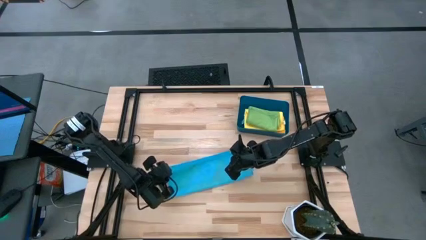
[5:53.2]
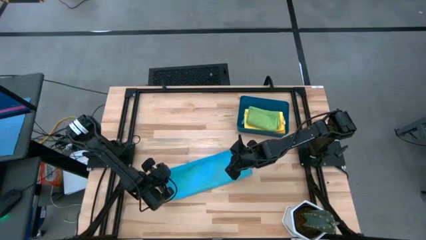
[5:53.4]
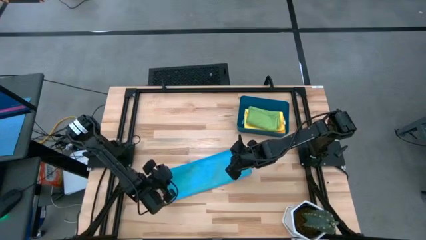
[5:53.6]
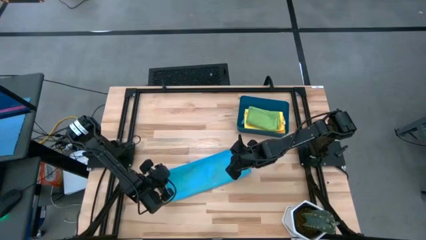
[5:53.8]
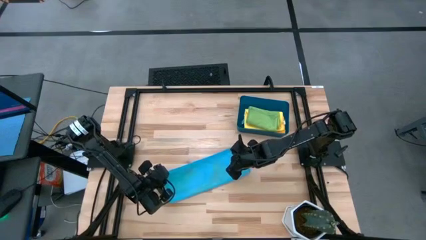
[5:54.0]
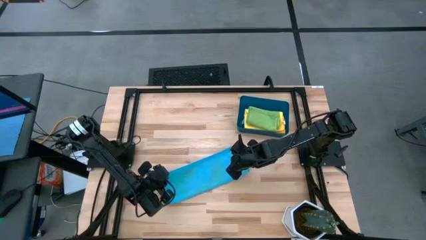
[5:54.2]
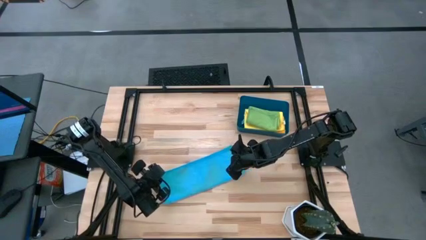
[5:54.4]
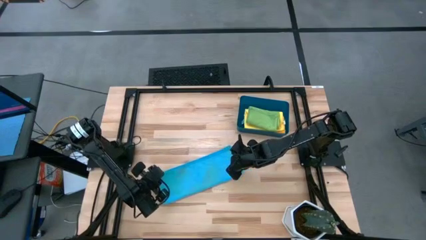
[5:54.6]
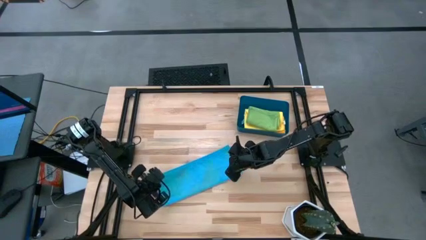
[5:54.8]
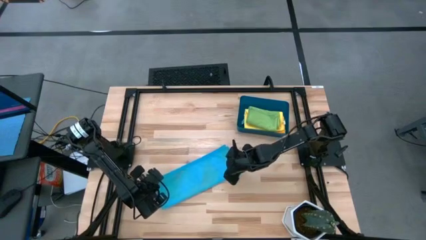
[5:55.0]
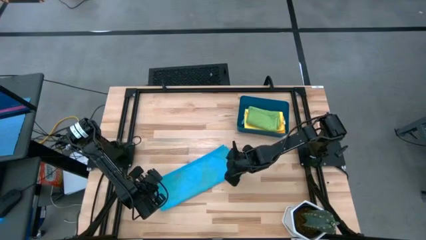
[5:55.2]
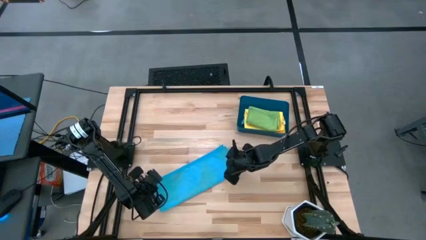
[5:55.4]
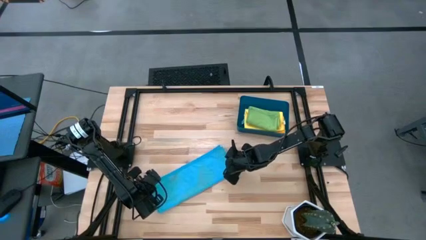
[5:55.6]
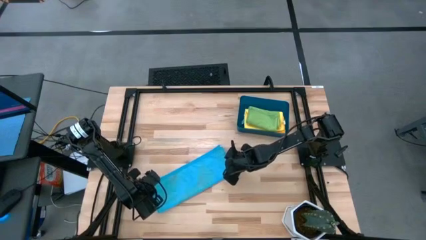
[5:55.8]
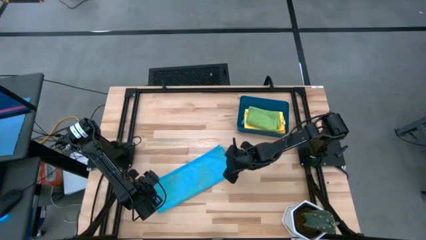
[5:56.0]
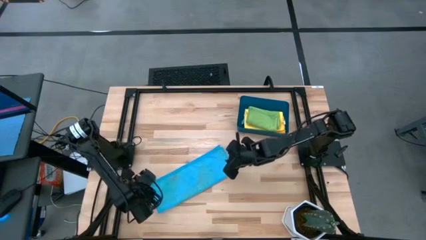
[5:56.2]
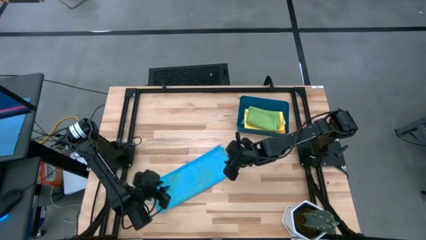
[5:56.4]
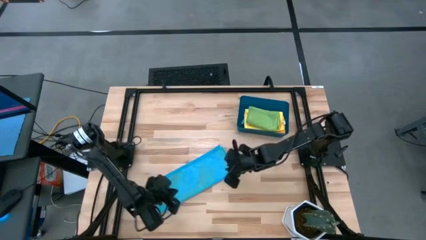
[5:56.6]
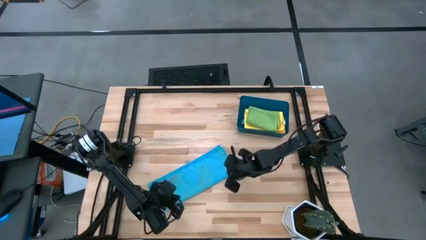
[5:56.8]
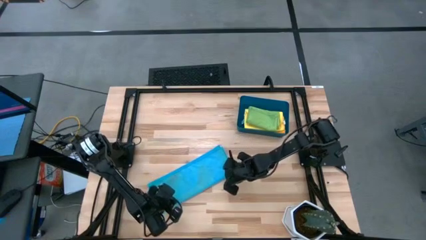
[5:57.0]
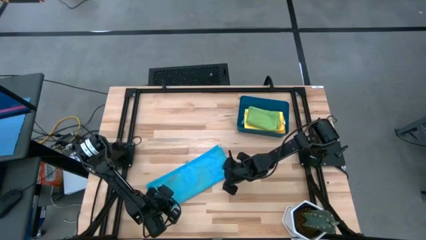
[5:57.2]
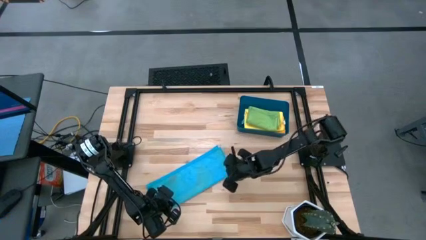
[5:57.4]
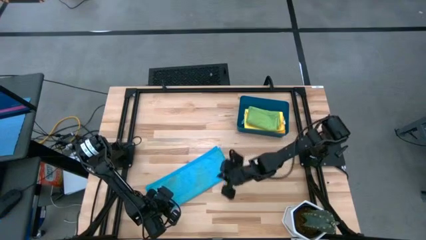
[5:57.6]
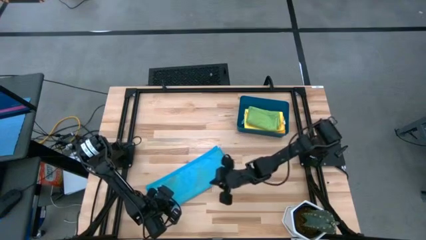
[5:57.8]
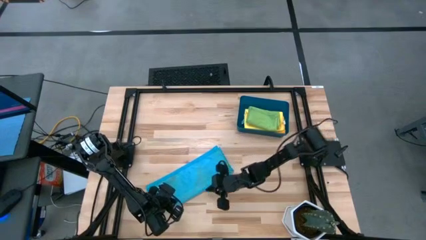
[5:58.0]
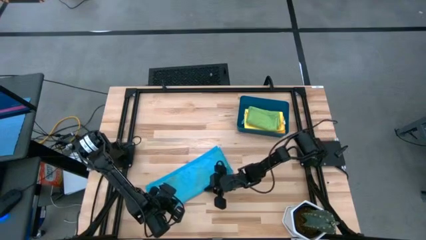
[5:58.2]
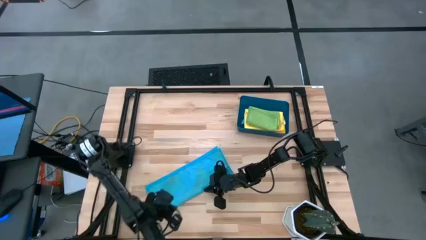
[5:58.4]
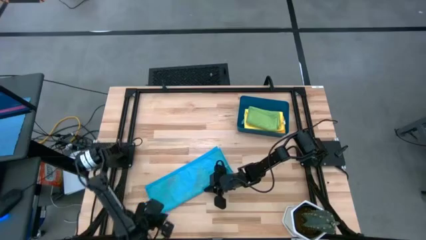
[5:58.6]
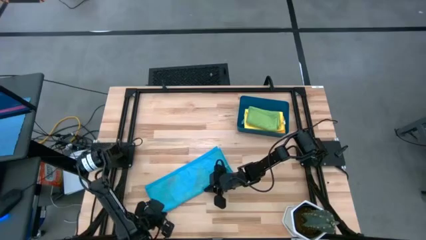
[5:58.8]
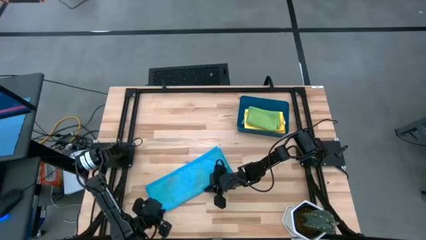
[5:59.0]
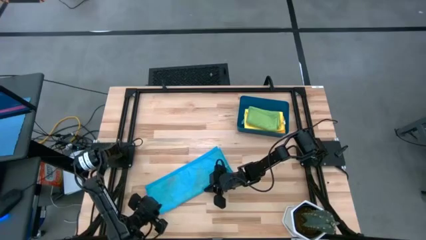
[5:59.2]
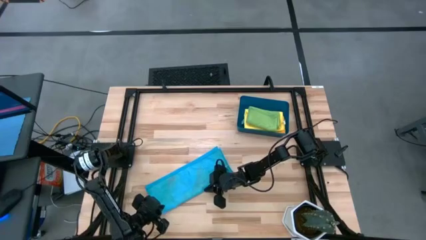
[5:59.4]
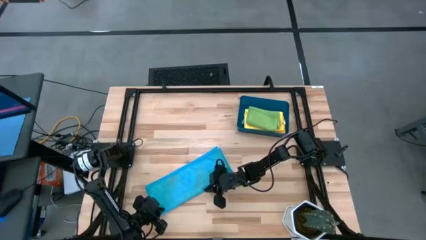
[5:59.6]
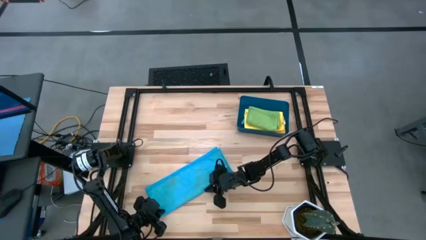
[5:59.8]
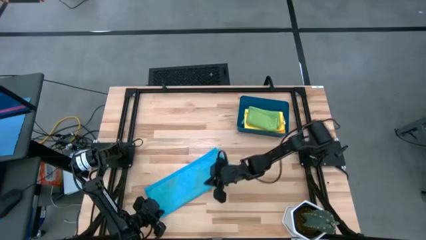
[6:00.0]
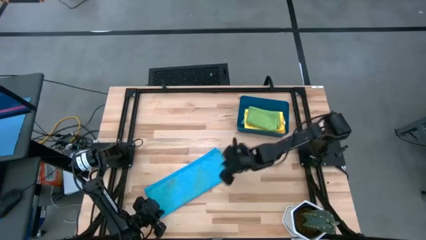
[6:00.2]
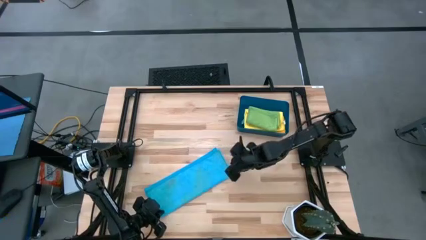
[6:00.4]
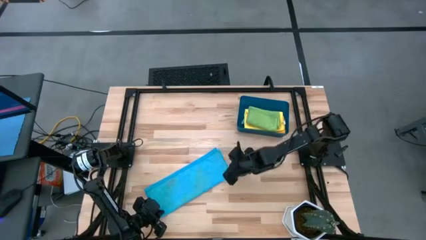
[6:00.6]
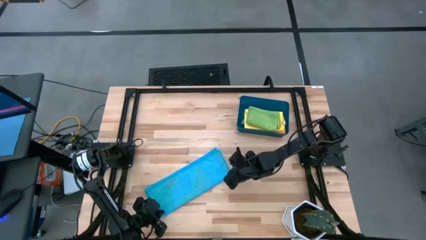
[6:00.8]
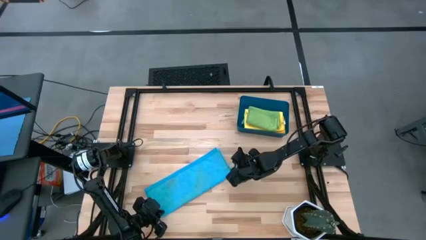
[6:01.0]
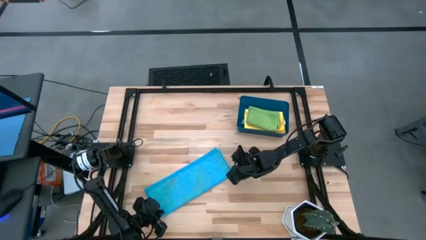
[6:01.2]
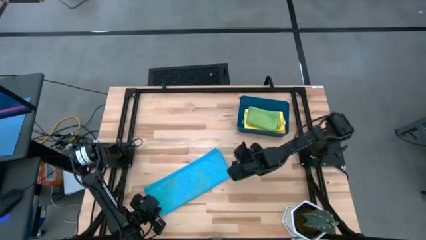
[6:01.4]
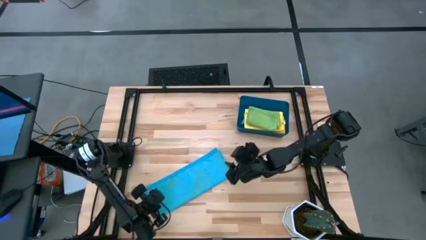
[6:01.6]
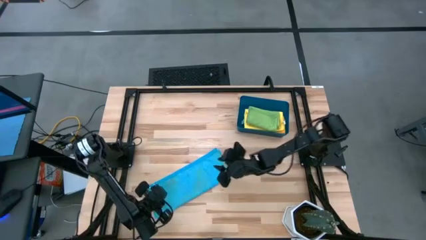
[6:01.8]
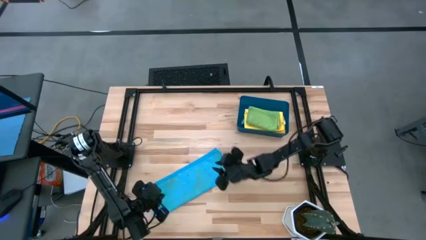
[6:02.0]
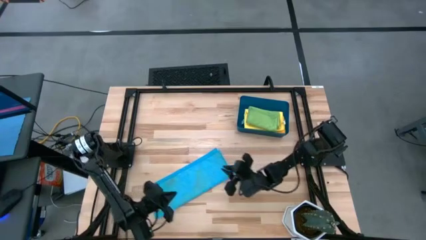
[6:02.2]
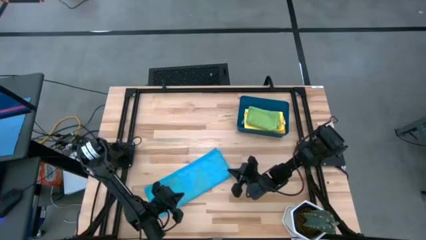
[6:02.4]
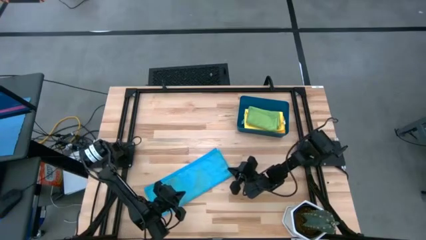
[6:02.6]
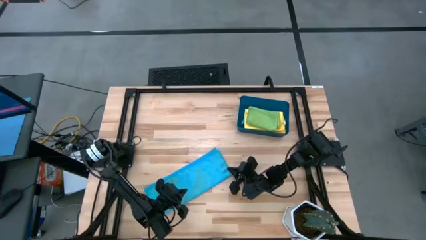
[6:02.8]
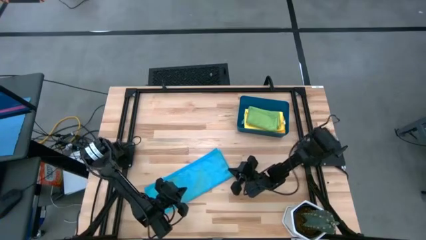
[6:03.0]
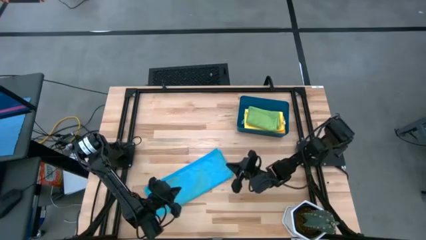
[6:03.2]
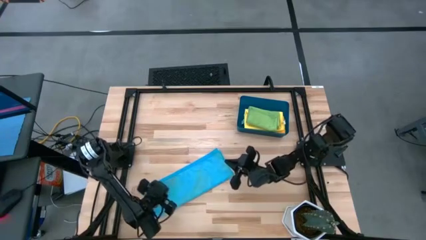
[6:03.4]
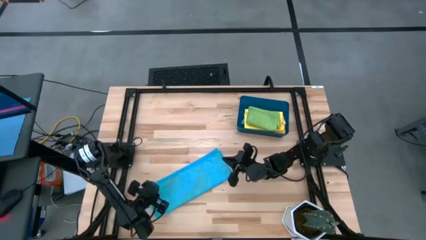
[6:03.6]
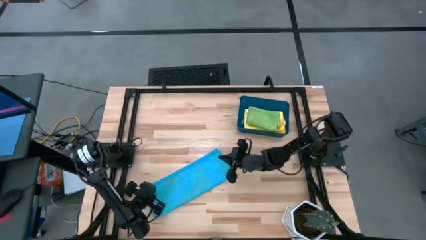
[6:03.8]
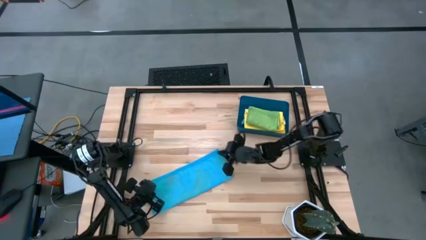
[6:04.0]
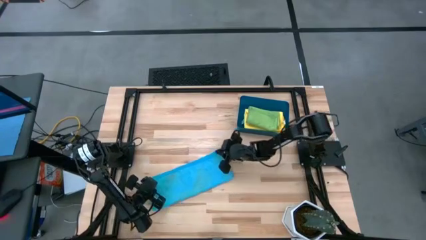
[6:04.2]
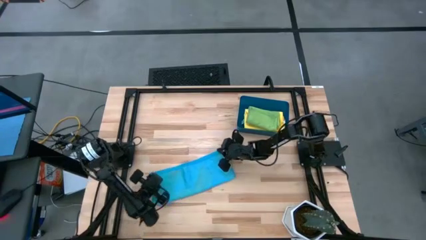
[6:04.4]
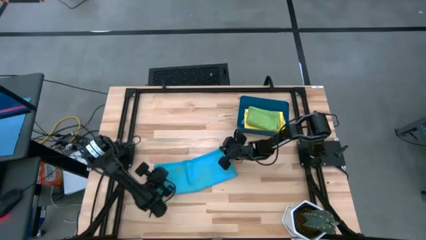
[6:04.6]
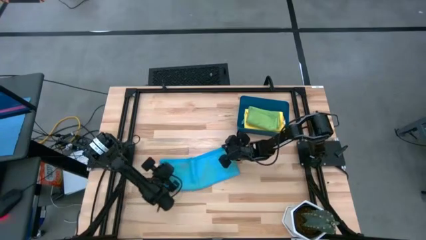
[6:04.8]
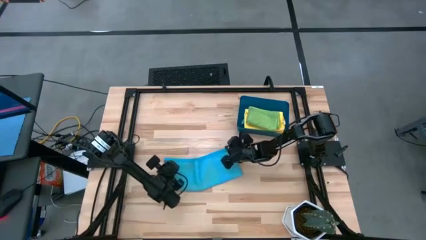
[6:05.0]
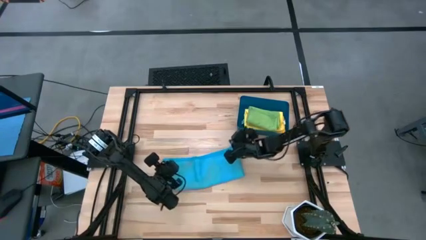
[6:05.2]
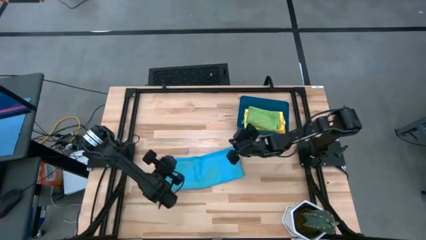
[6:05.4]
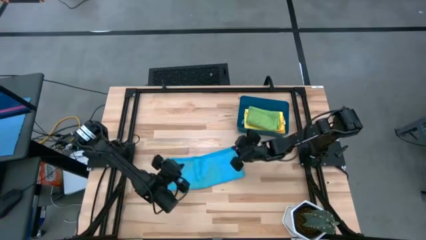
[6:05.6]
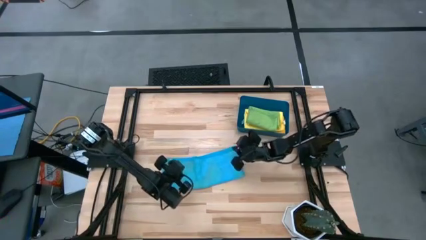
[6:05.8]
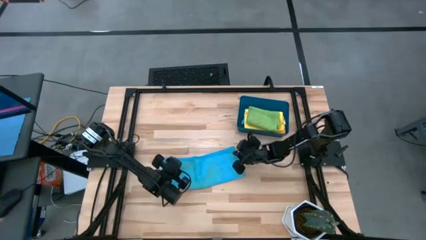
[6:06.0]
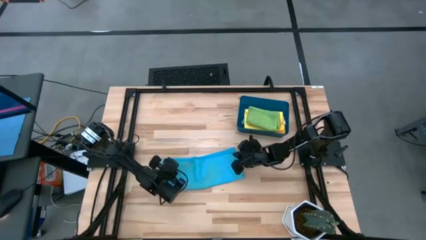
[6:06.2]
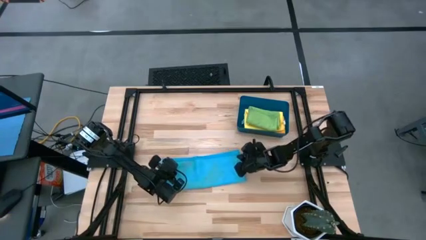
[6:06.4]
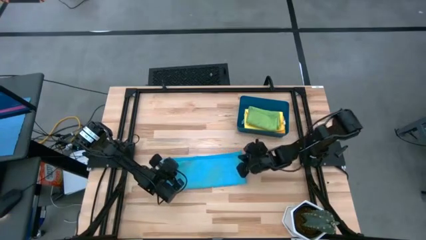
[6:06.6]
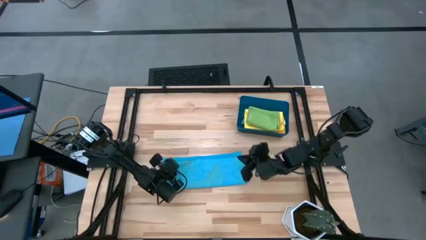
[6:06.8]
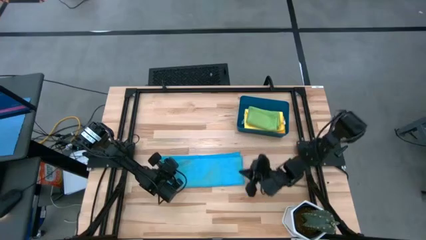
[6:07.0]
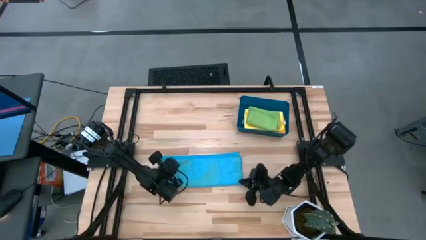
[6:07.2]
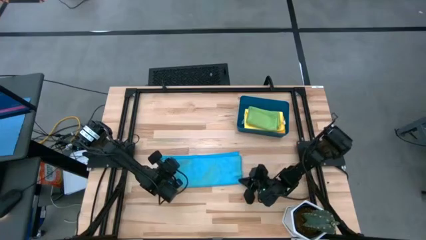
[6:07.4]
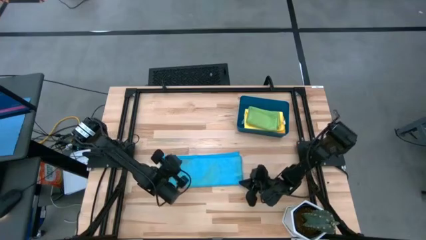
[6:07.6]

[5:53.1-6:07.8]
Task: Fold microfiber towels
Fold the blue microfiber cloth

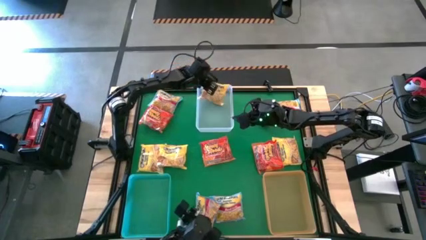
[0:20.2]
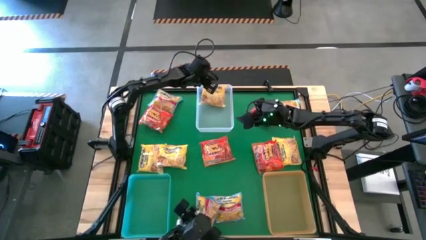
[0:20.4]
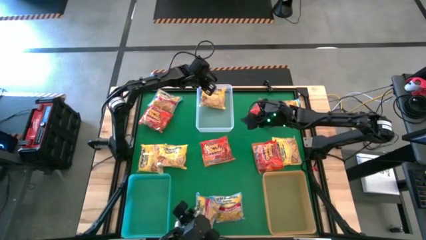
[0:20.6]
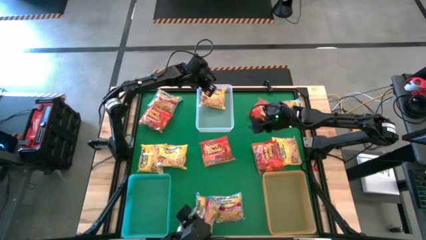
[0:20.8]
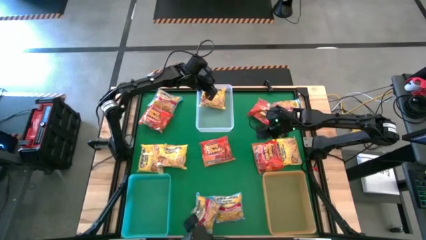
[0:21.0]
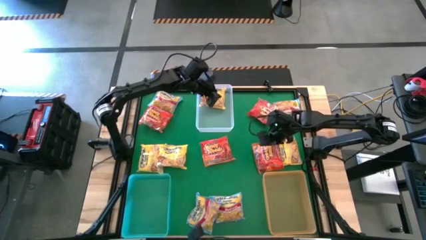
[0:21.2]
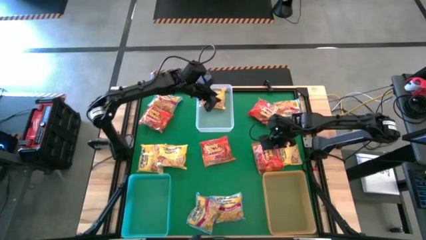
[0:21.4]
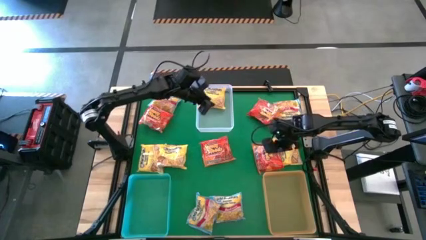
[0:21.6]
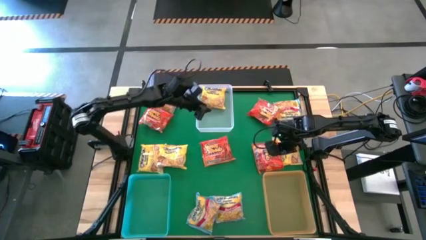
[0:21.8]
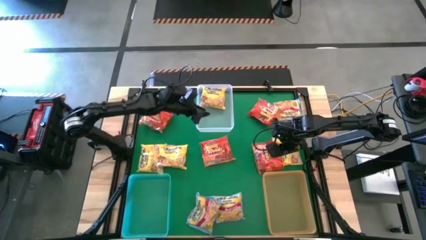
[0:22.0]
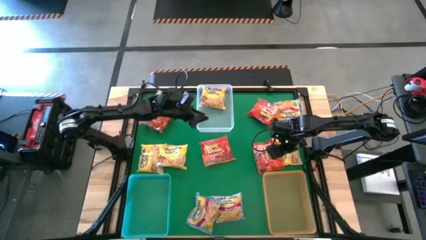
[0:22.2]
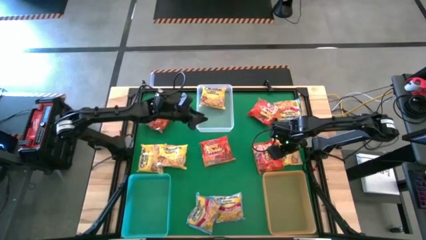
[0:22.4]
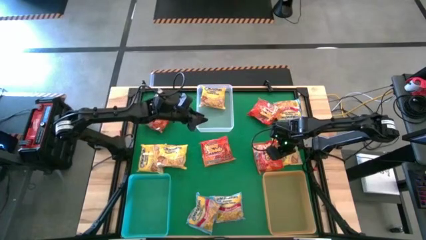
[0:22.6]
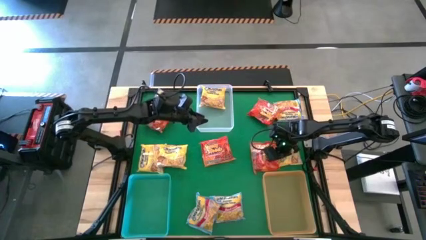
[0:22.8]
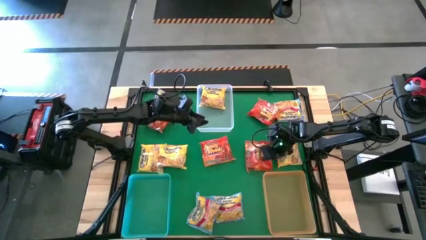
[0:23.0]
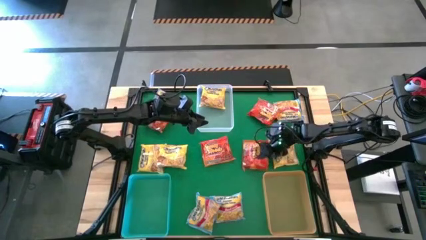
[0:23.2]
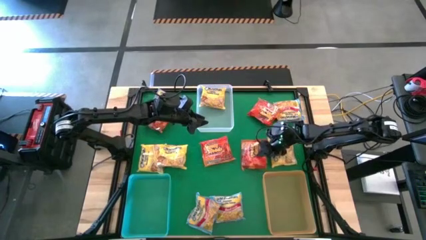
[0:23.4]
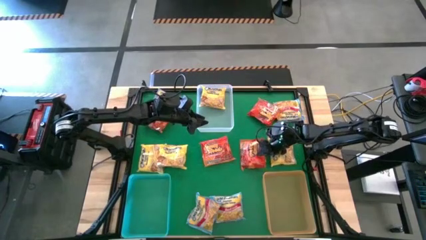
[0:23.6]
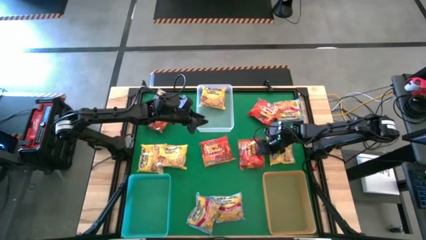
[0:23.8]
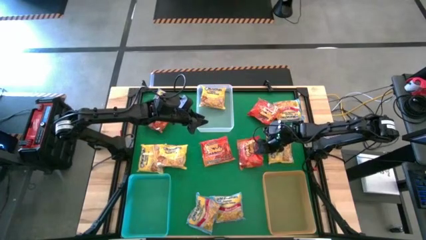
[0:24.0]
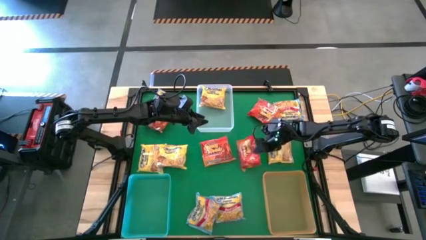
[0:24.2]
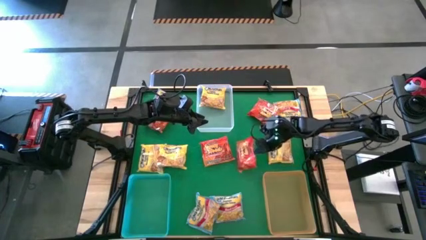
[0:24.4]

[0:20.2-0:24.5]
Task: Sort Maruchan noodles
Put the orange noodle pack into the orange bin
